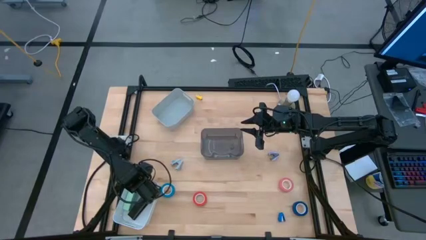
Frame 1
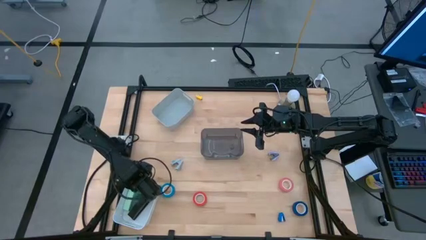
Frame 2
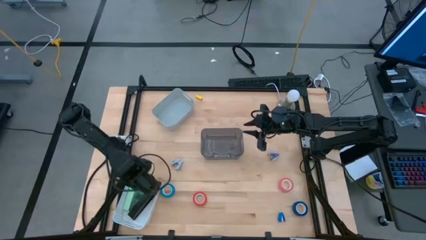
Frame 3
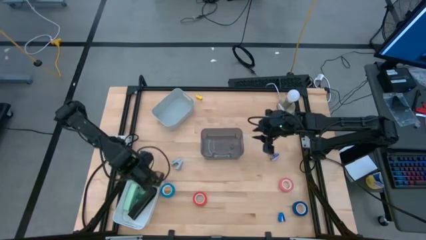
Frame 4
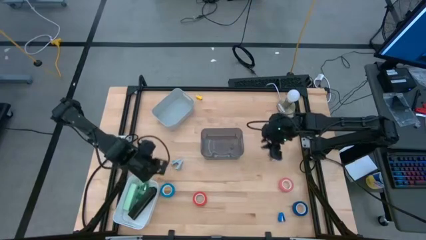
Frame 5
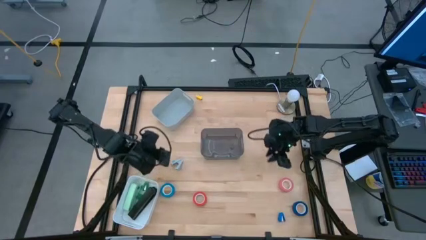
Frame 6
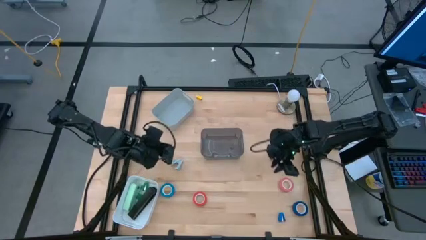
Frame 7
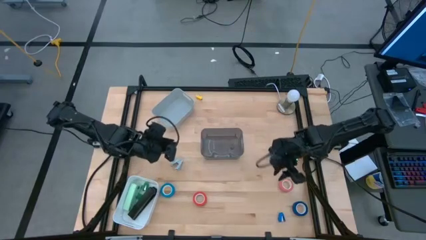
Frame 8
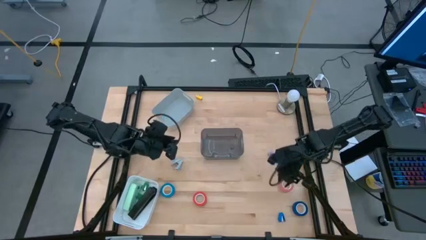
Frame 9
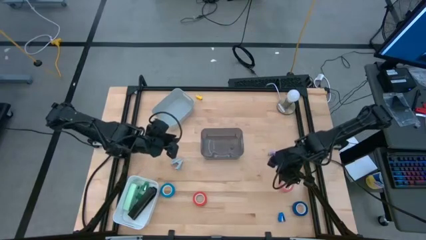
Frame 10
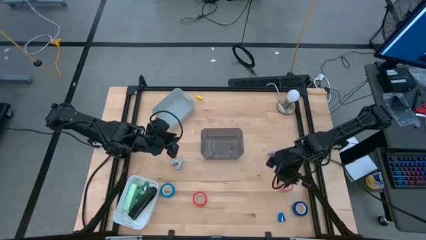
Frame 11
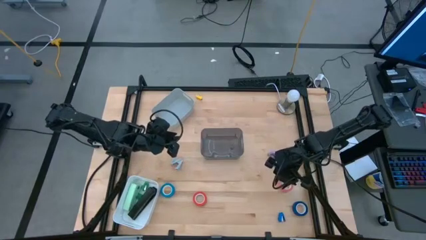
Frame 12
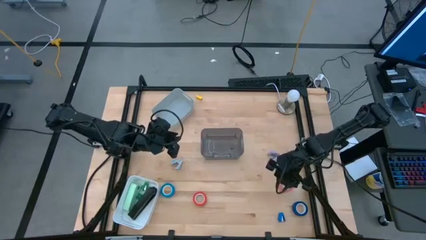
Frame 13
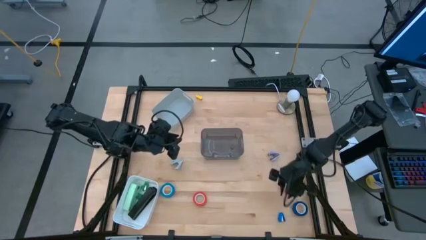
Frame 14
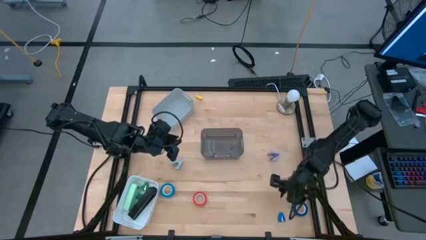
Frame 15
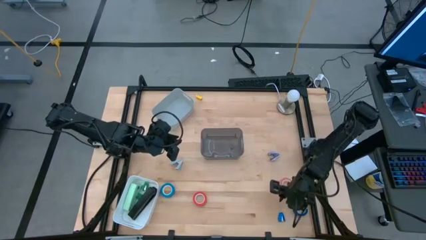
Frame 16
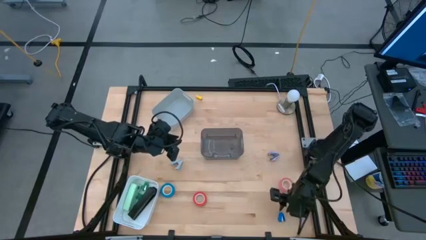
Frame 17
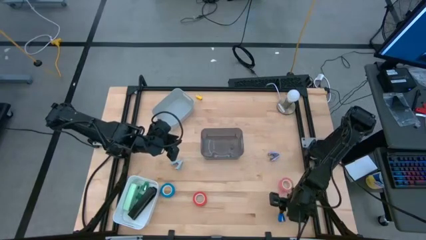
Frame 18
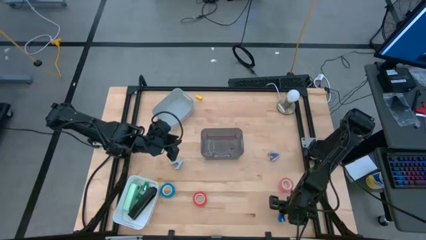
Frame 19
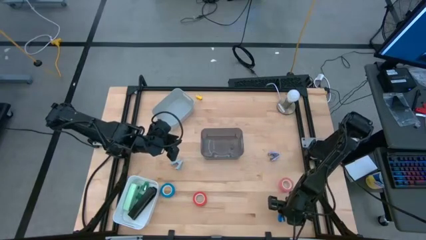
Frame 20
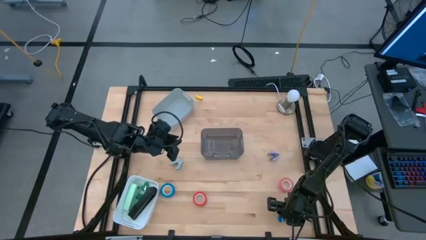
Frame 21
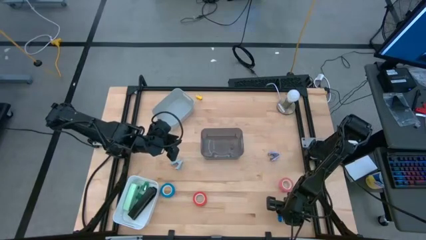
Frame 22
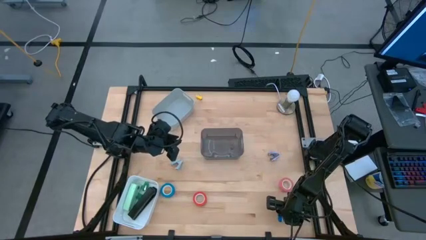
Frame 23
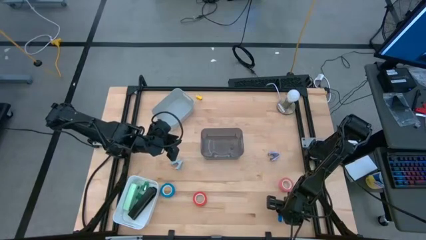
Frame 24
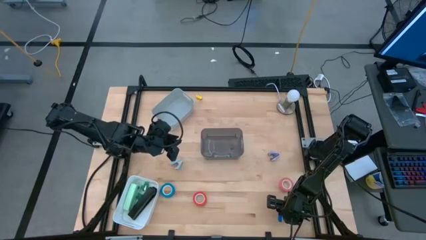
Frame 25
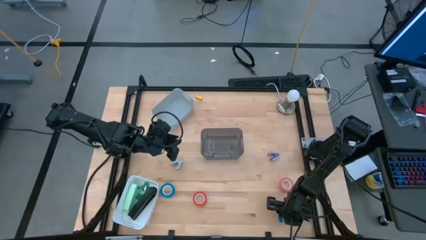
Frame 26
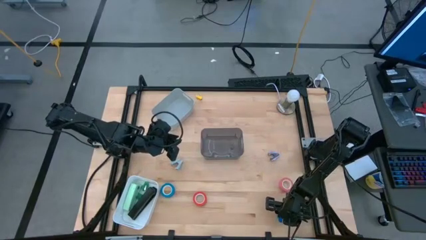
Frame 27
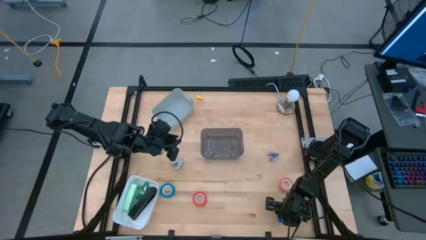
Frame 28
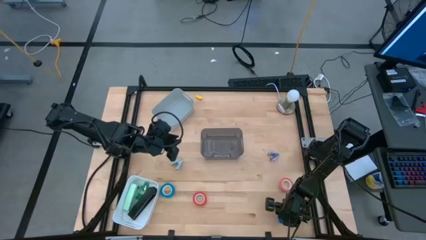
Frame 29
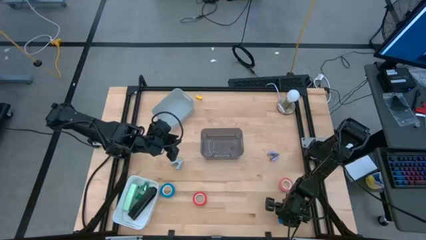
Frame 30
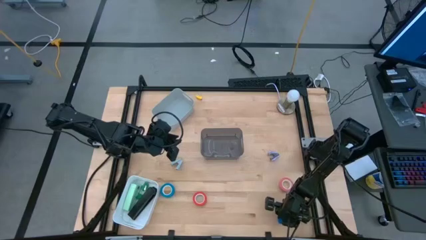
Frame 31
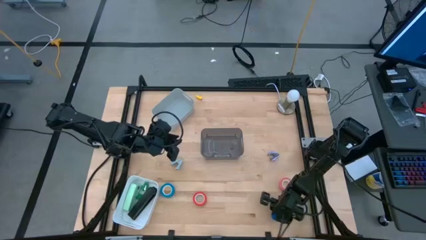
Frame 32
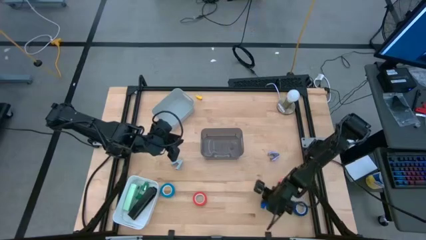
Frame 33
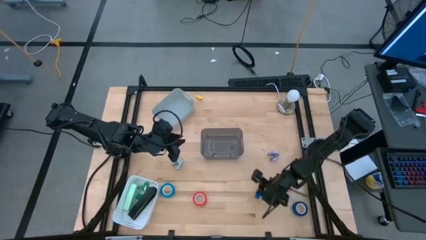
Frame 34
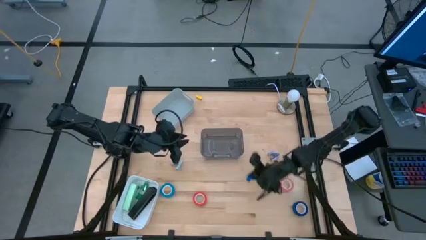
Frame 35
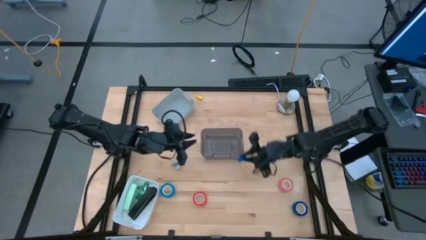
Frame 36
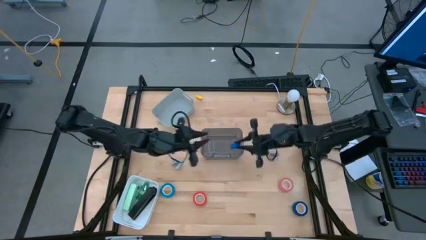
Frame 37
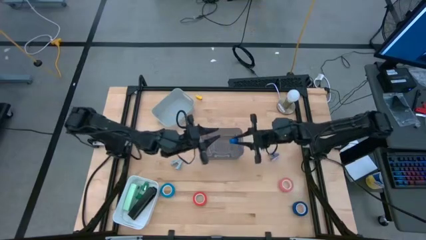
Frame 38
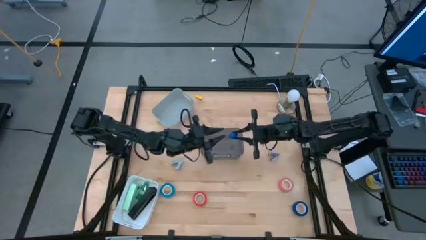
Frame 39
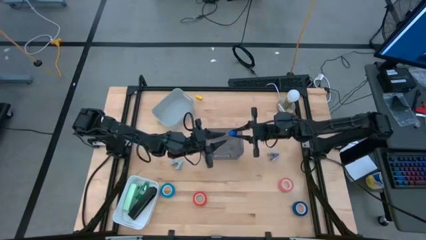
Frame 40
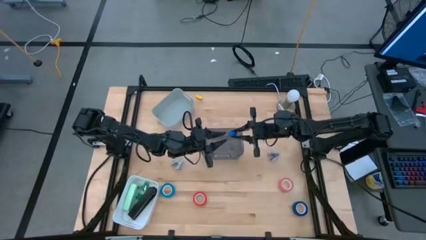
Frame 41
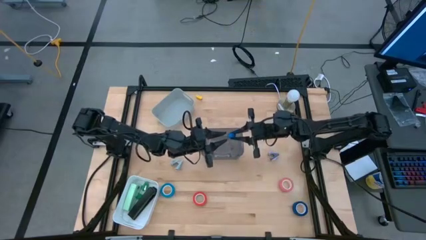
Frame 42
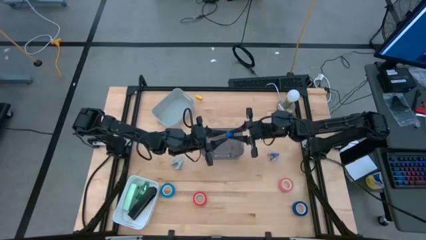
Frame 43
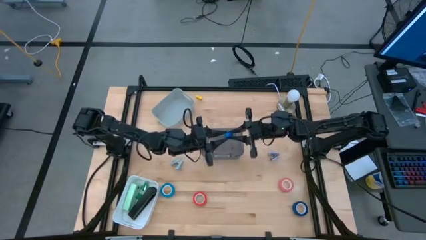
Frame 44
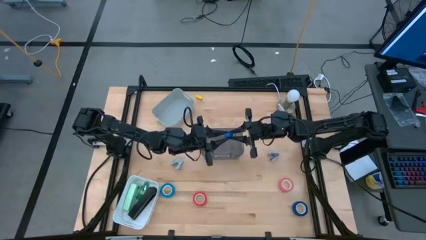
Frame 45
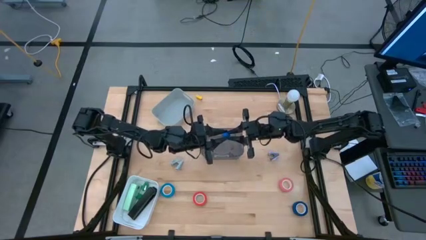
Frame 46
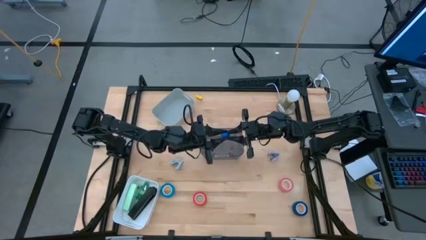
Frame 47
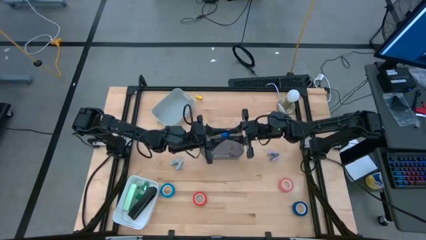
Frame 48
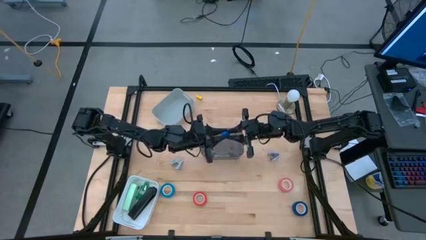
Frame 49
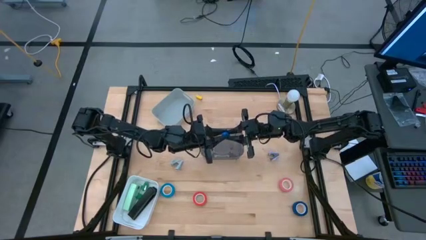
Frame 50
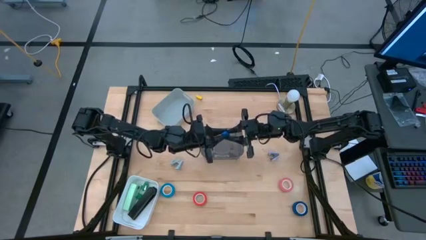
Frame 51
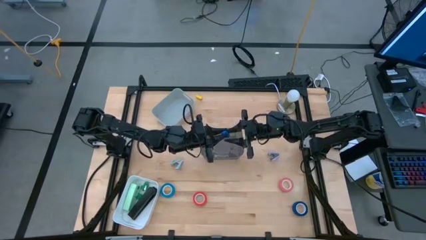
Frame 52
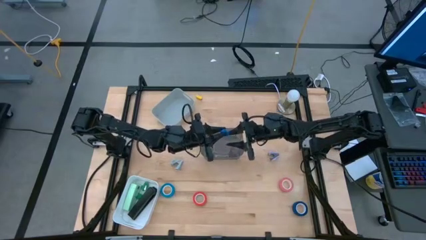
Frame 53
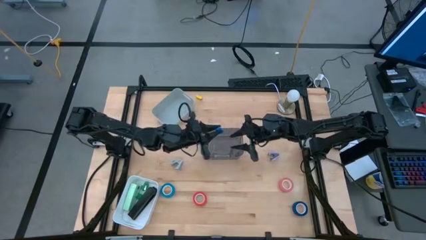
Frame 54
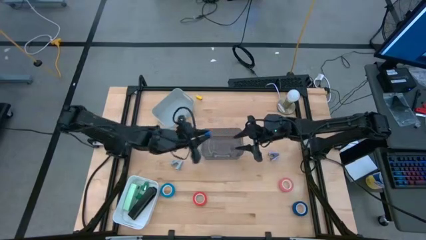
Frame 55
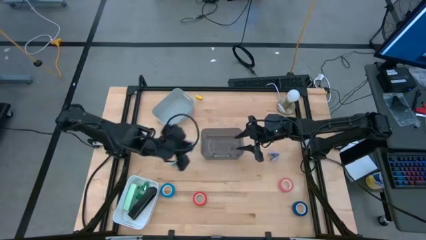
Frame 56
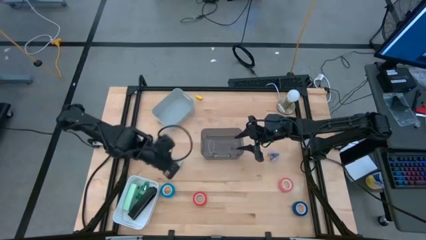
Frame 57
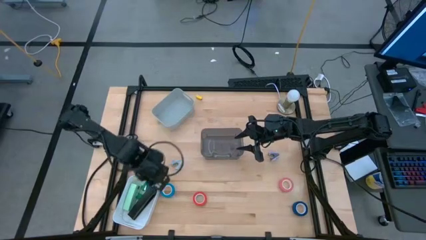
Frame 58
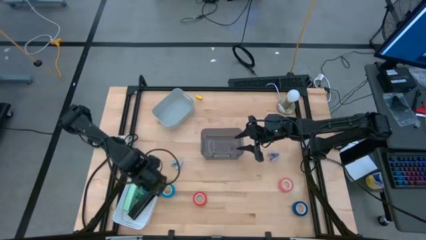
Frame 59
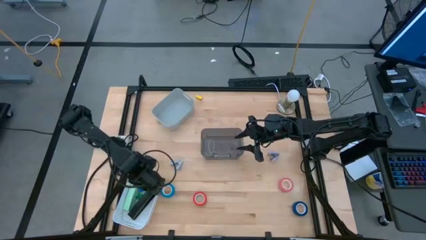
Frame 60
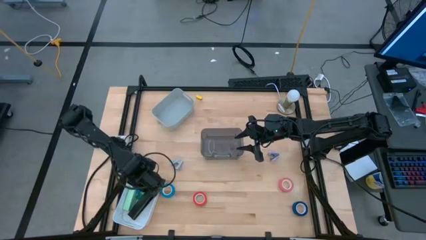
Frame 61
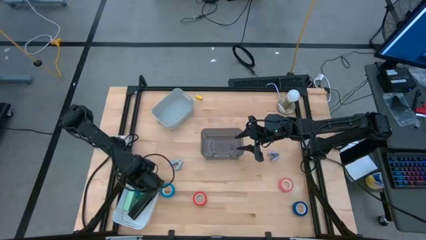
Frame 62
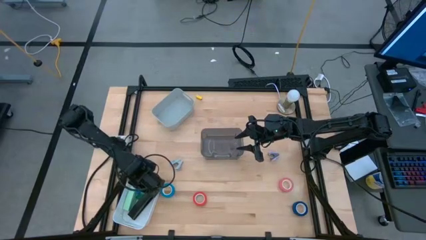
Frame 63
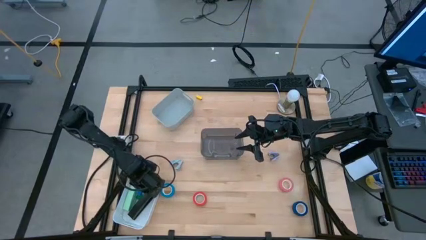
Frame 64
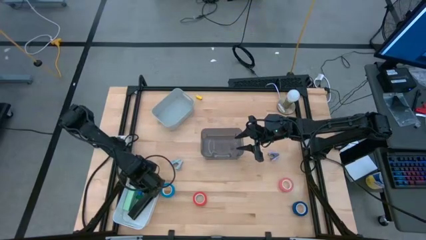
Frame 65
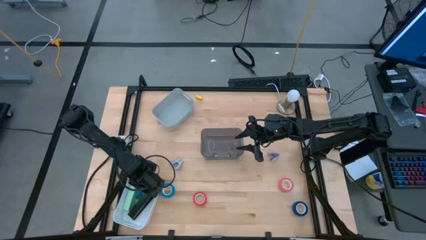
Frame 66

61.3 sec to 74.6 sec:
Task: Pick and place Stapler, Stapler remover, tape
Put the blue stapler into the white bin

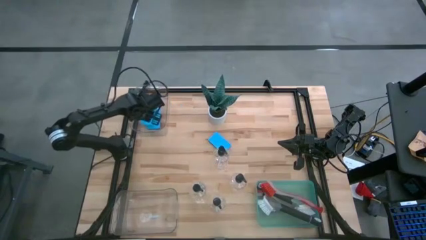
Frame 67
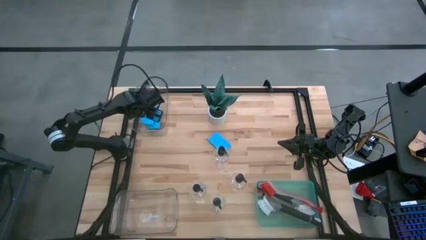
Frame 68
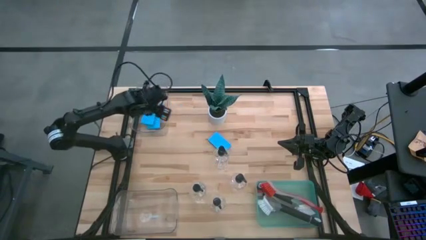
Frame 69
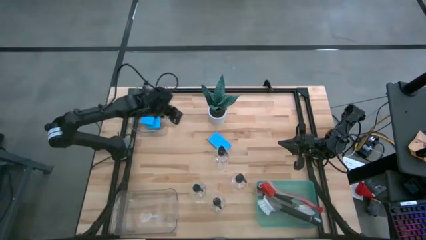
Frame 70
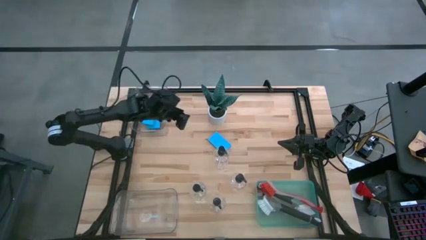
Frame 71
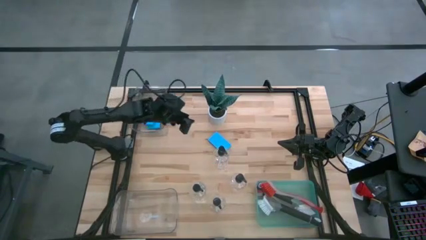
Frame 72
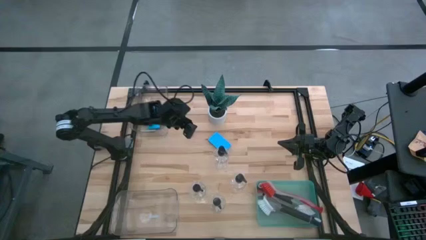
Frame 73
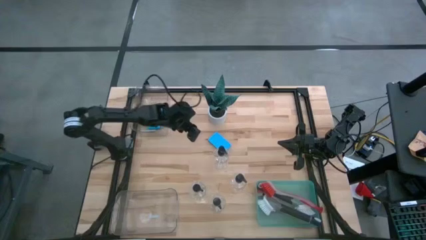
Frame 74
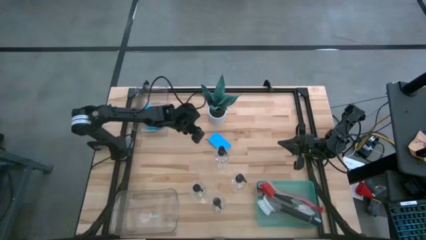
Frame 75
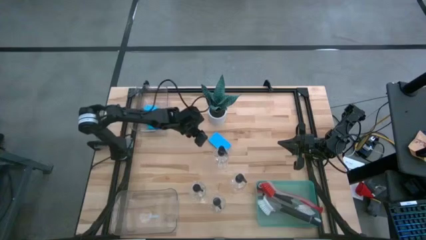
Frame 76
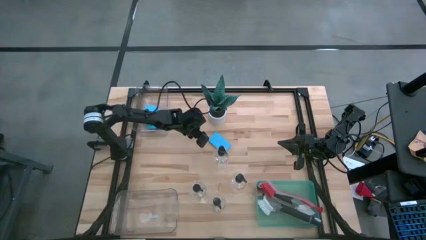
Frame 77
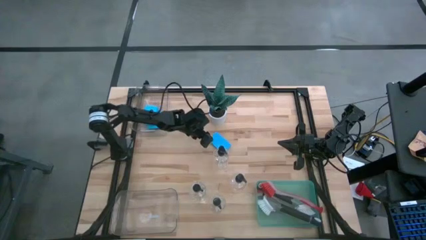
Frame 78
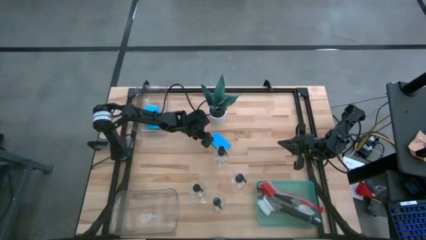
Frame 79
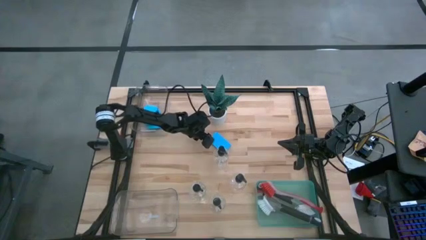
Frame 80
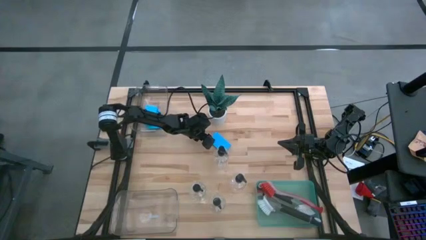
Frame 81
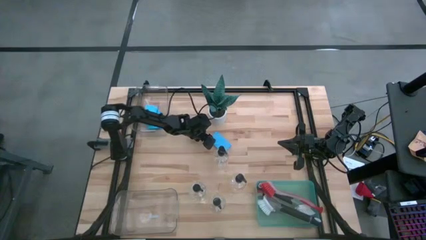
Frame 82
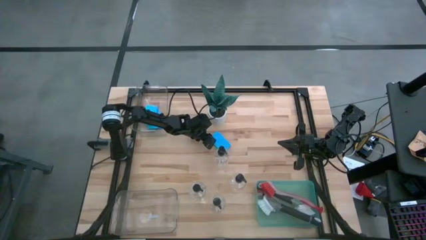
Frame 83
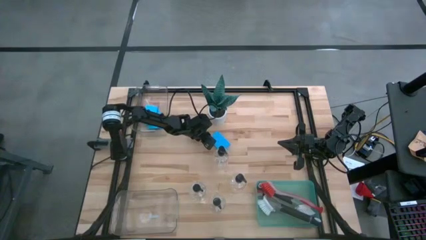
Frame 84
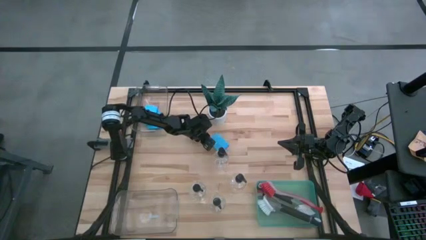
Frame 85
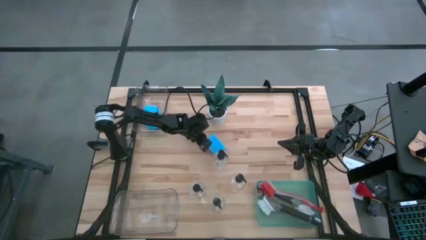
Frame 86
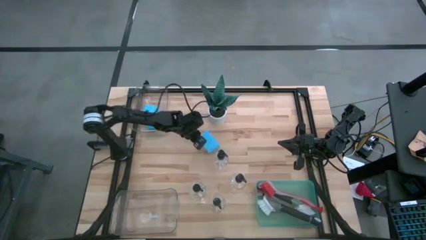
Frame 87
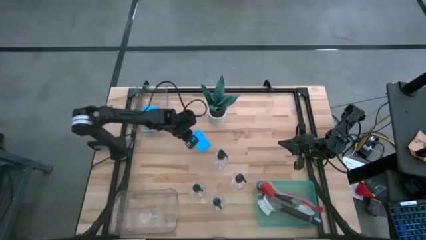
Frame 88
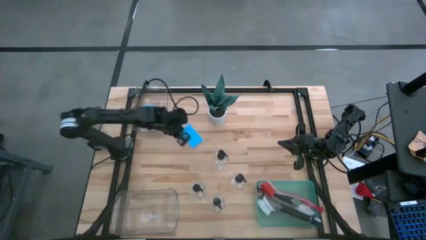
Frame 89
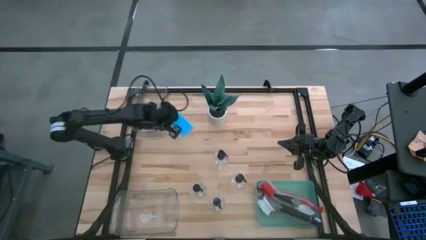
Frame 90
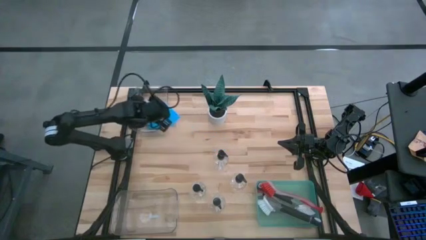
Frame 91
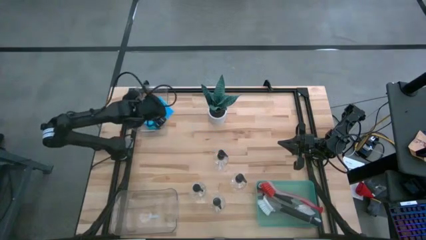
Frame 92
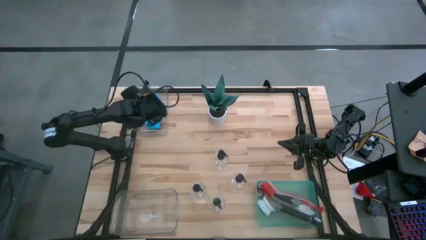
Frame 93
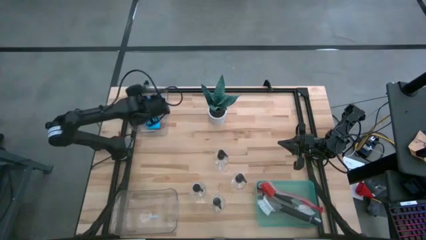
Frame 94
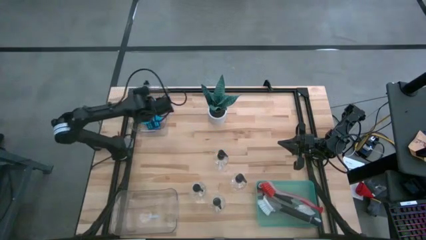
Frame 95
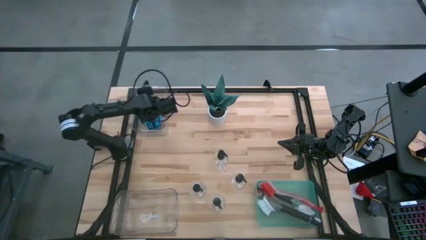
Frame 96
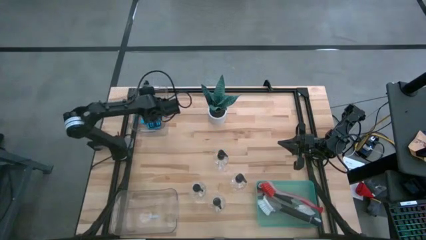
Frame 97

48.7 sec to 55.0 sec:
Task: Pick & Place Kitchen Sink Supplies
Put the blue sponge into the top transparent bin
